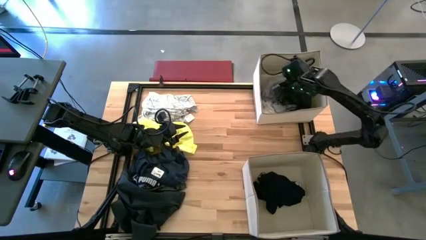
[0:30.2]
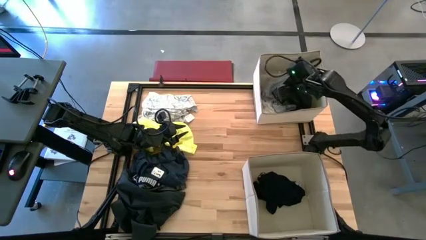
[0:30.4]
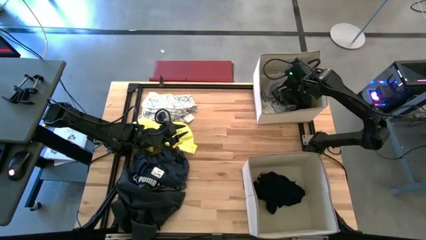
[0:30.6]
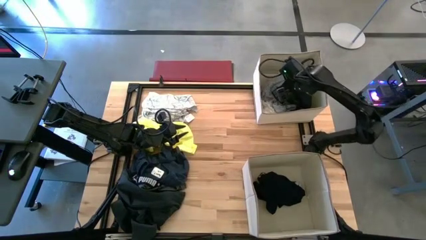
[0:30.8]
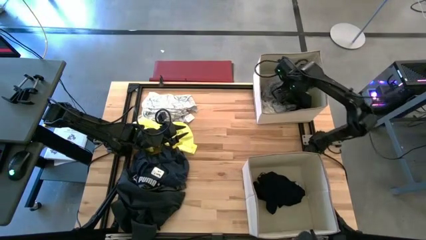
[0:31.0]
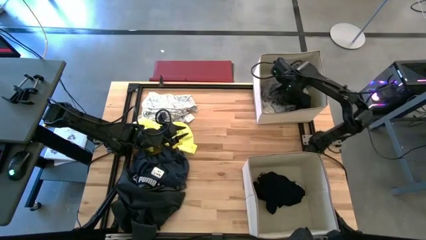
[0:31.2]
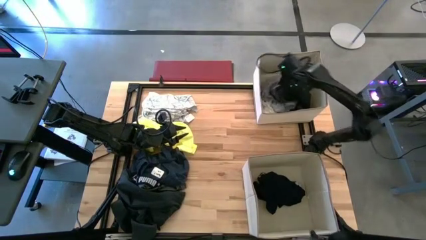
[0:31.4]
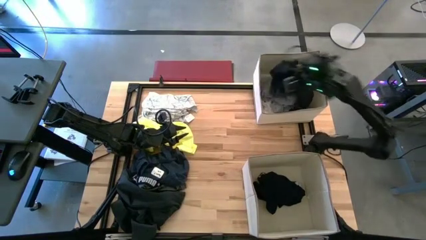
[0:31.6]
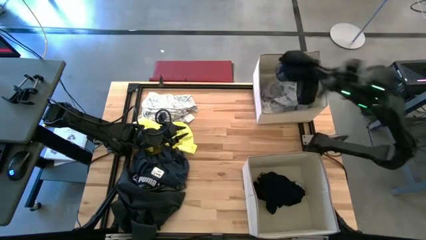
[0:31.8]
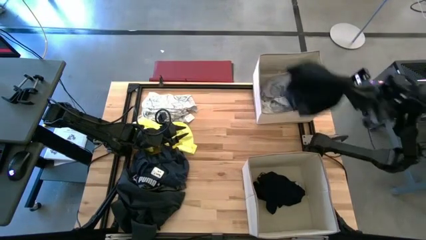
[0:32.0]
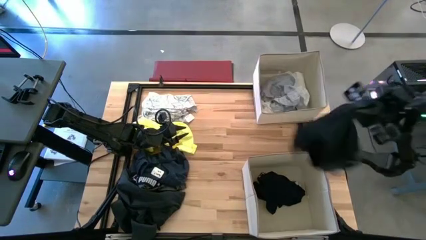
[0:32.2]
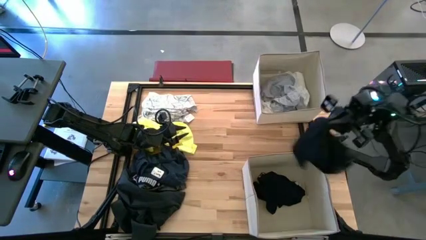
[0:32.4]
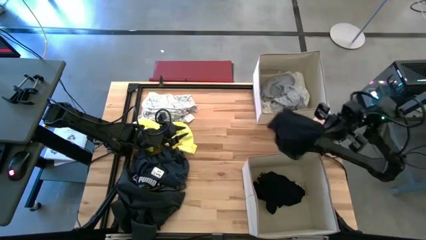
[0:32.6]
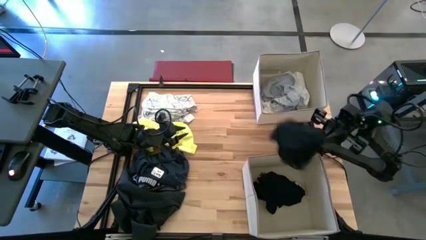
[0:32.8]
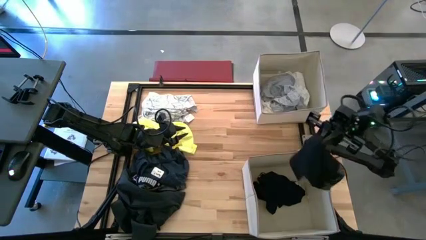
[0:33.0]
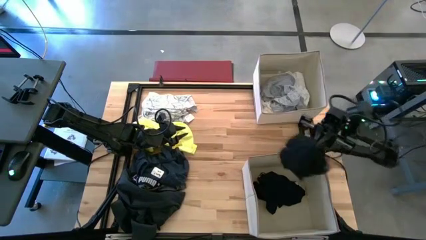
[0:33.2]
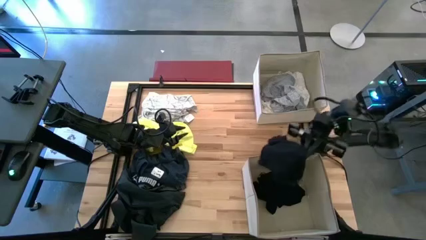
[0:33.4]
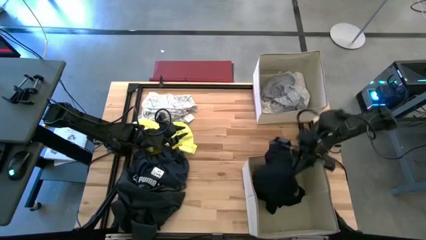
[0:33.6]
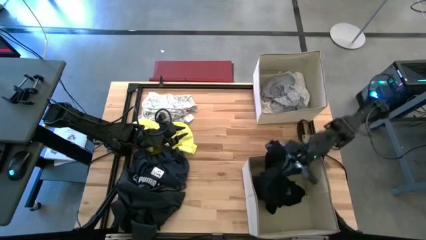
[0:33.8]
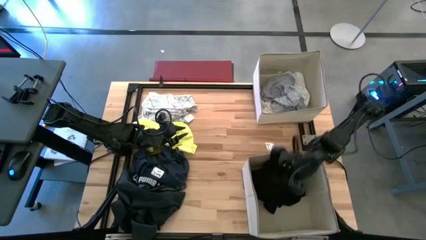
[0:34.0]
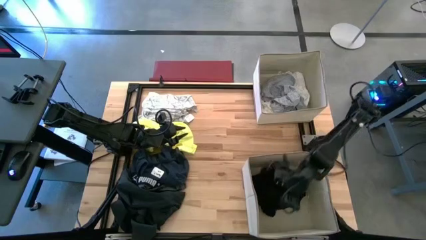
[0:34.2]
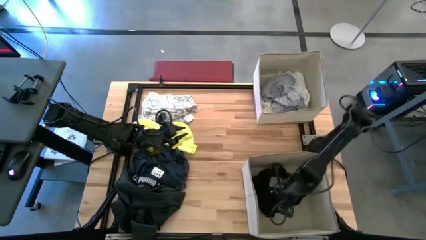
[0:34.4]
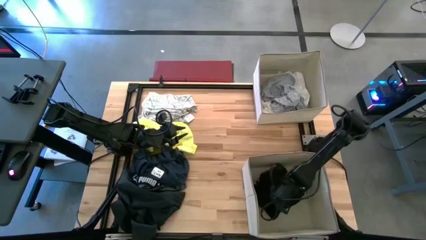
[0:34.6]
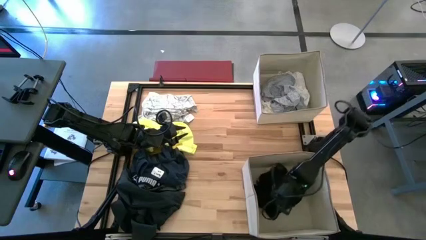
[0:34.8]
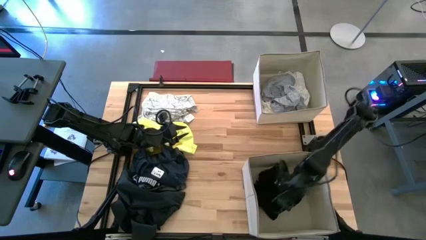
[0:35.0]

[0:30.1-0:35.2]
Task: Sort clothes
Put the black underwear in the bottom white bin

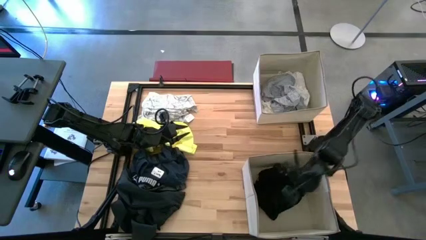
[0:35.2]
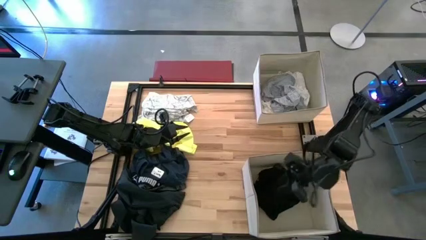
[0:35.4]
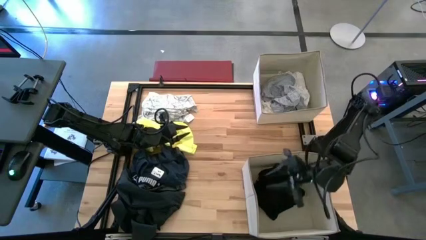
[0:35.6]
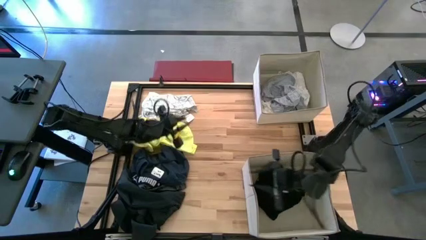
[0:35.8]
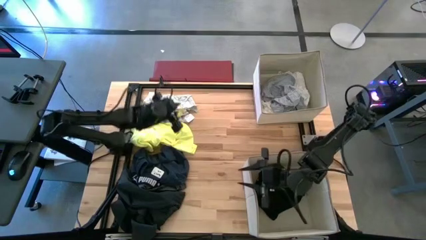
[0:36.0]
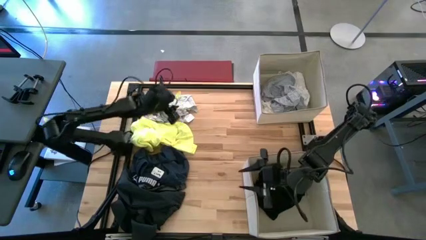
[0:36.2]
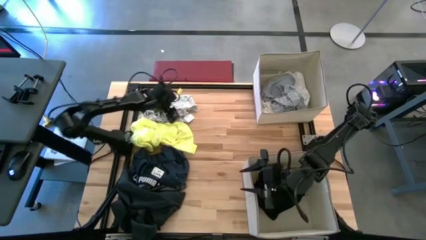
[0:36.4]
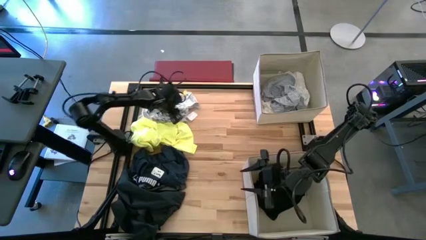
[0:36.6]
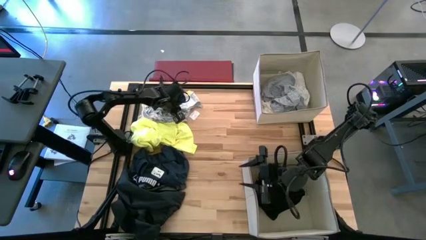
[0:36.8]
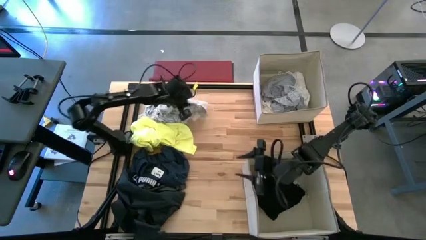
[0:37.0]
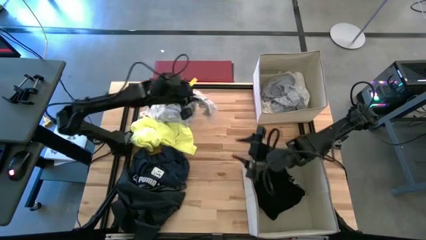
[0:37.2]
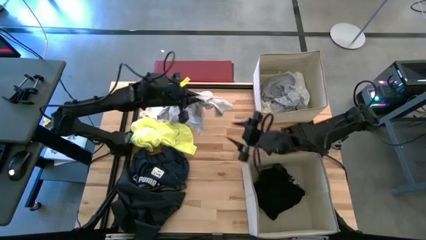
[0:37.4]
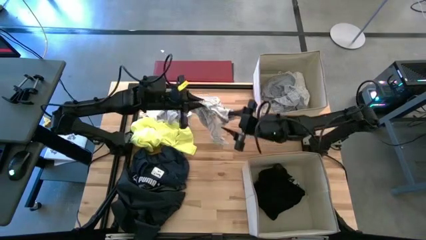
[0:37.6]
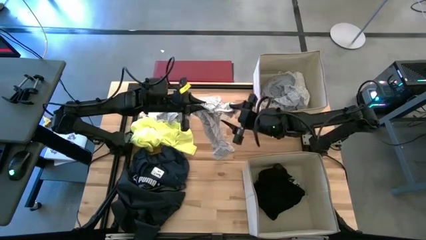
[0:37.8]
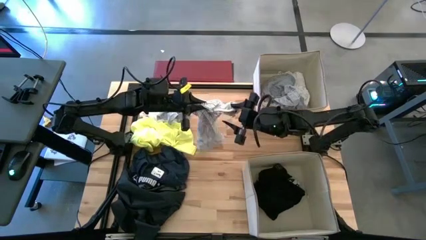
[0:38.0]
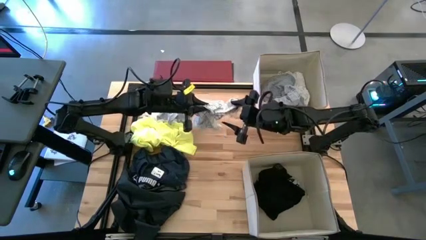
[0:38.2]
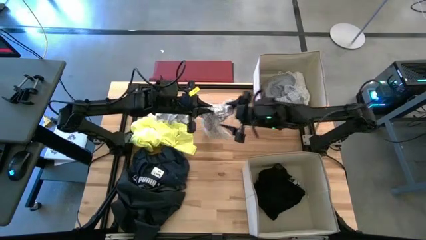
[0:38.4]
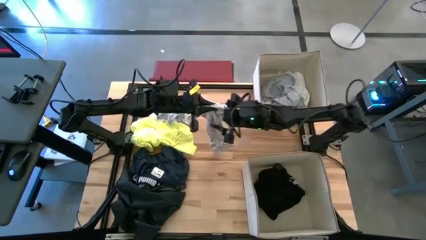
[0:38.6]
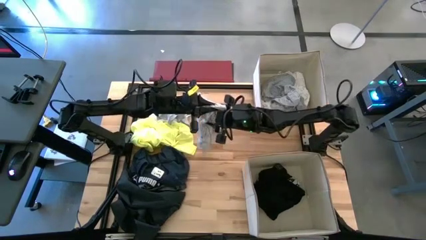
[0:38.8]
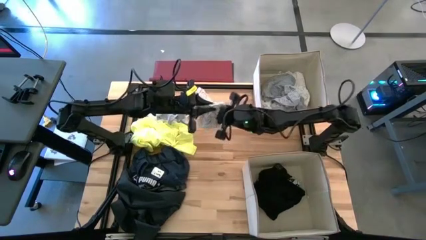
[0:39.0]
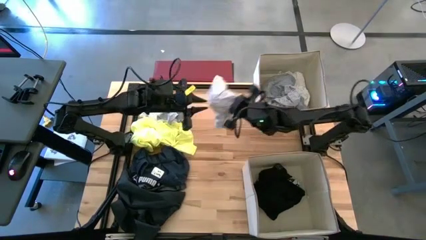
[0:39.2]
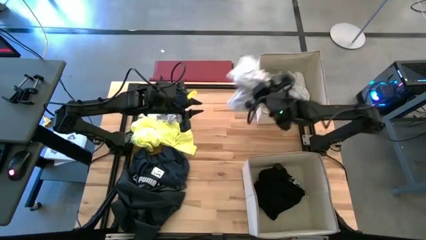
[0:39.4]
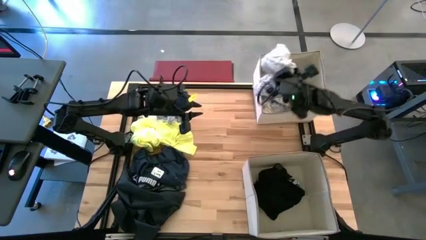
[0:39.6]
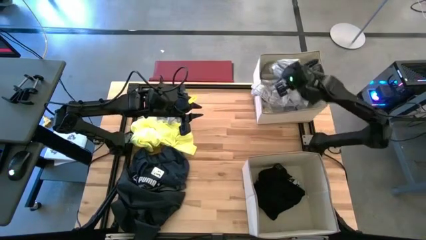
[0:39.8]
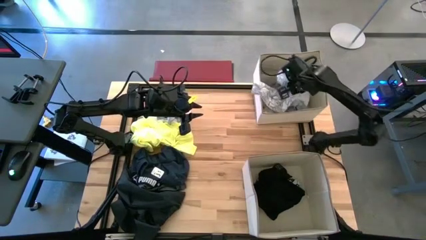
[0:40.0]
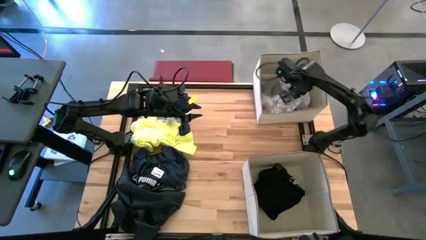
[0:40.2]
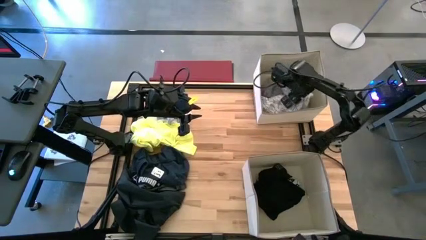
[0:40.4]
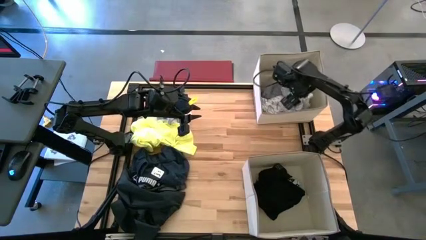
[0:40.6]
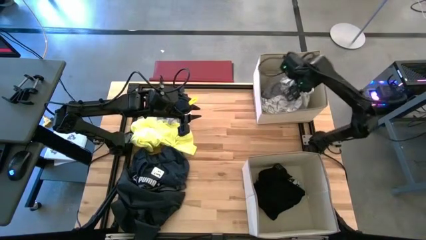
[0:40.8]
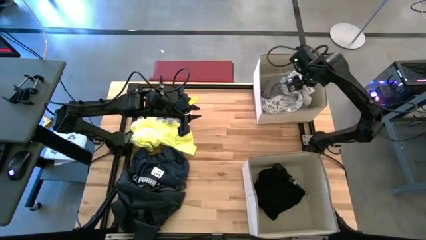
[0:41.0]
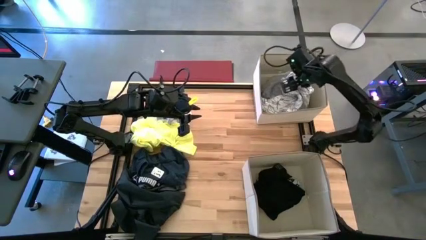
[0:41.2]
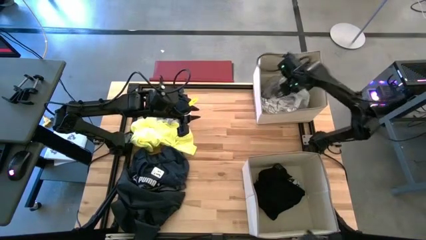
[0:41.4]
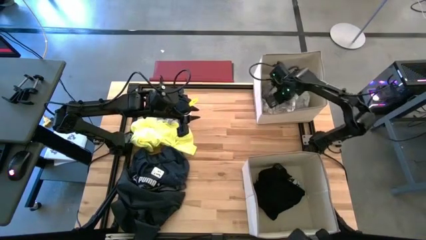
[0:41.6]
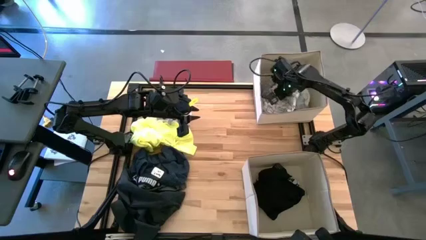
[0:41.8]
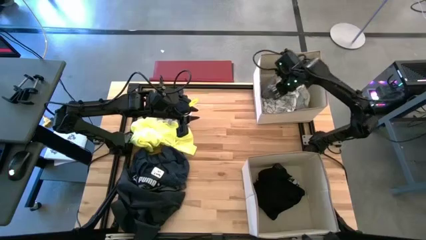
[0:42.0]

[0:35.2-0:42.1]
Put the white shirt in the top white bin

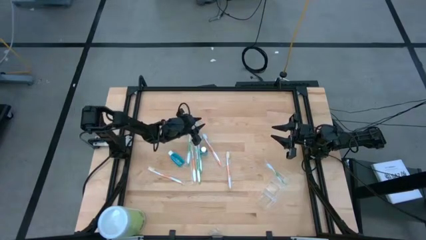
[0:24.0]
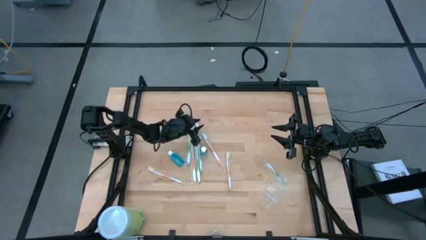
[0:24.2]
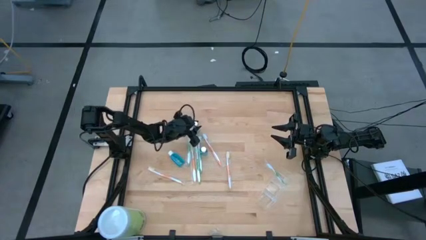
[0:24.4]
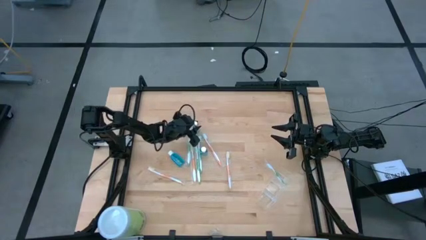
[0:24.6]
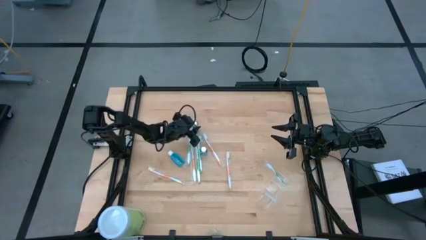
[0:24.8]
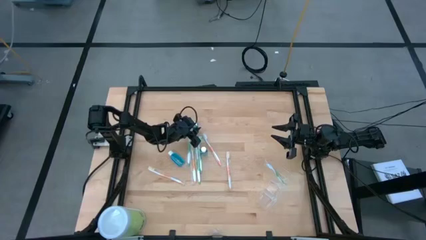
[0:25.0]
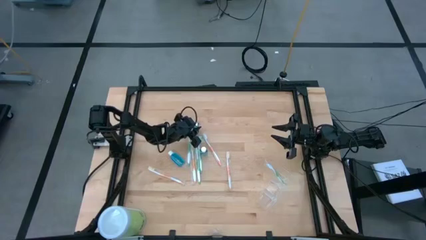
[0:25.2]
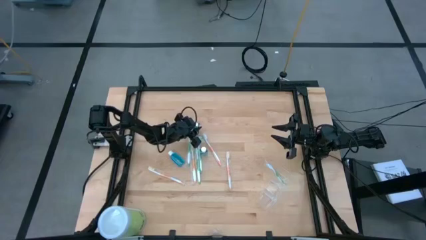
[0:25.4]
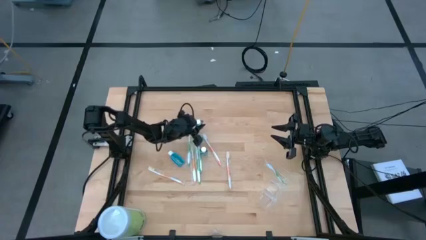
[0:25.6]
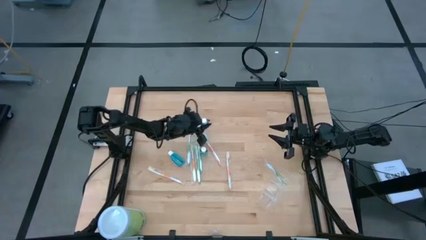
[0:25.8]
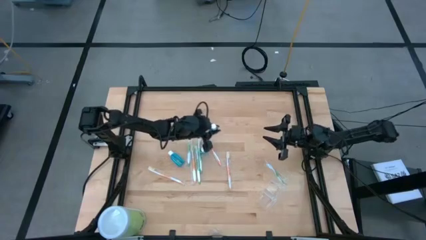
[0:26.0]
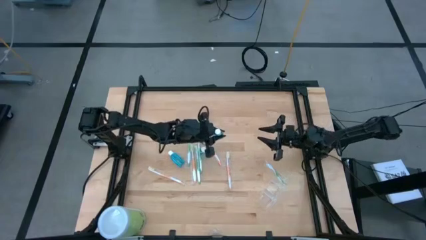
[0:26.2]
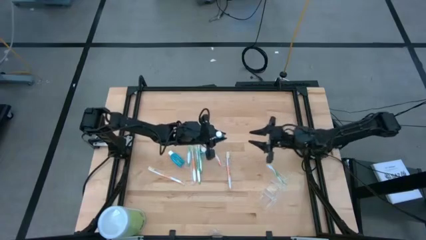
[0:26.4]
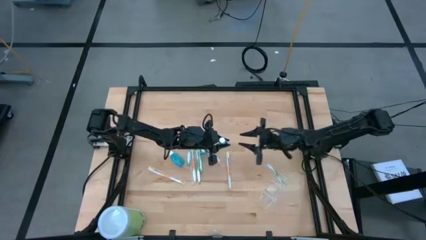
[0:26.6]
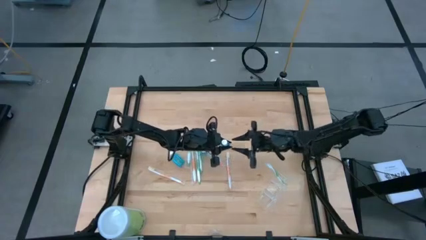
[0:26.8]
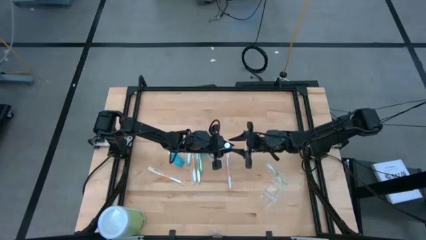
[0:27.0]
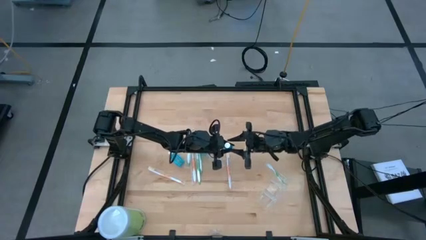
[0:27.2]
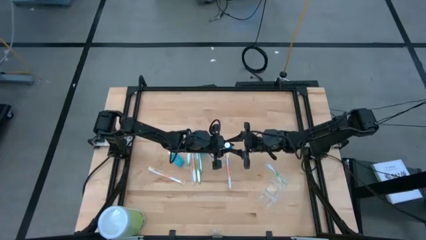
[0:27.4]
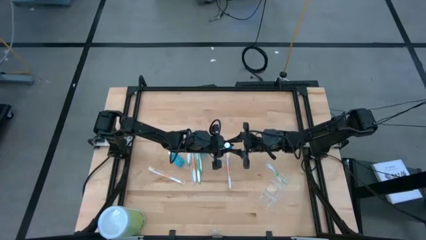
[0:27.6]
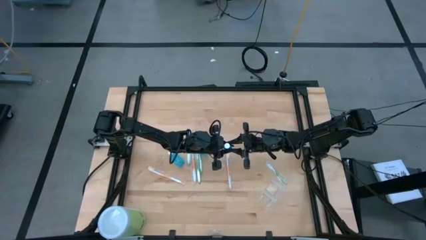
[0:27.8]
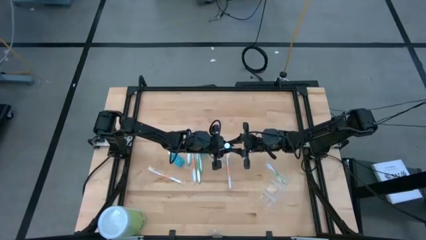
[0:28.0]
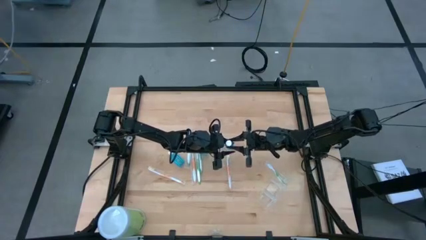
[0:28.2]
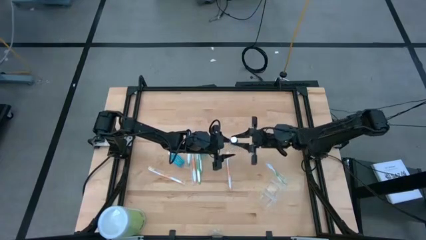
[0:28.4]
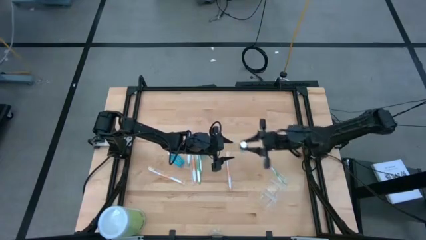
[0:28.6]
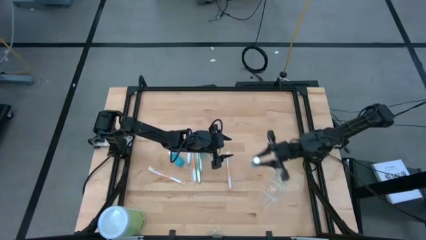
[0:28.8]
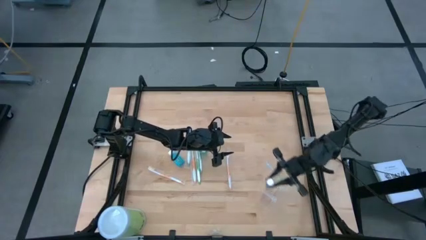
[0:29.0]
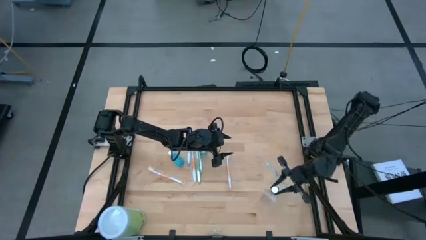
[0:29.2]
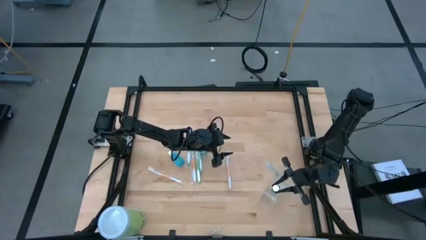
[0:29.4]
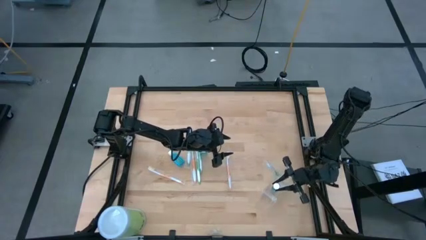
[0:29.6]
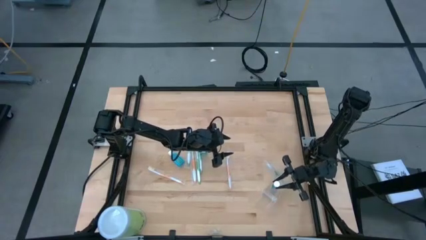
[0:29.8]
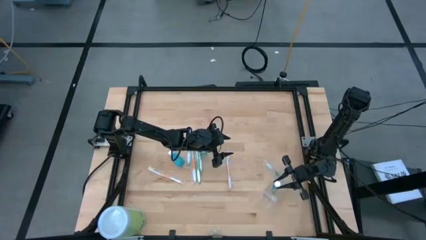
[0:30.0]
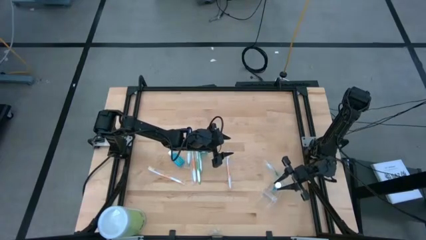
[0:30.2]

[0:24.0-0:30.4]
Task: Pick & Place toothbrushing station
Put the blue mouthwash into the middle section of the transparent organizer
